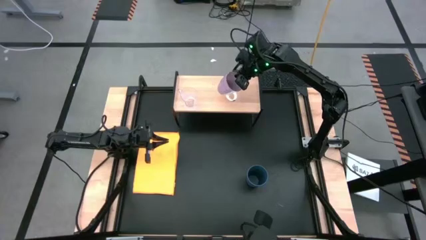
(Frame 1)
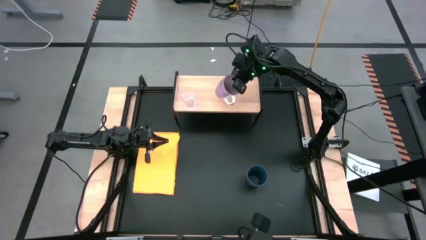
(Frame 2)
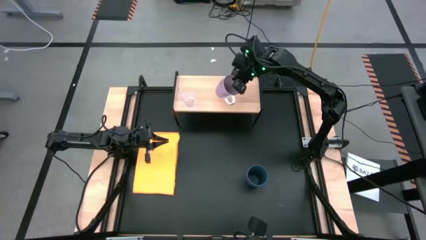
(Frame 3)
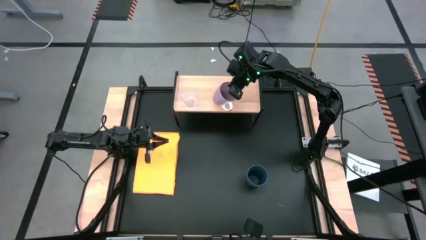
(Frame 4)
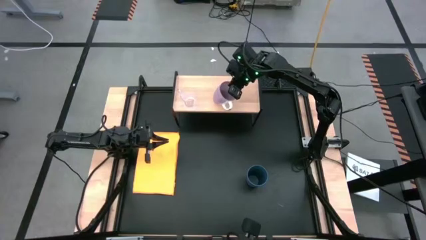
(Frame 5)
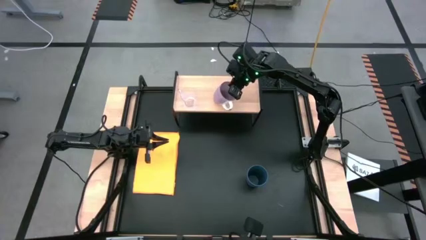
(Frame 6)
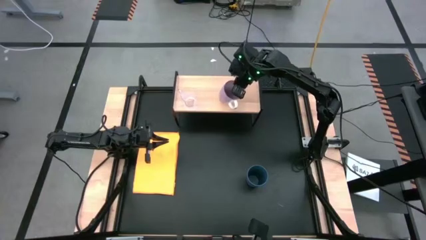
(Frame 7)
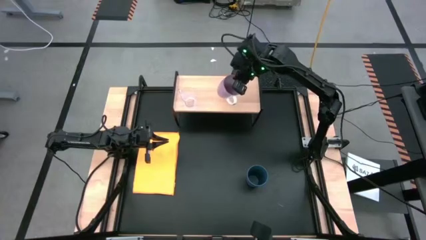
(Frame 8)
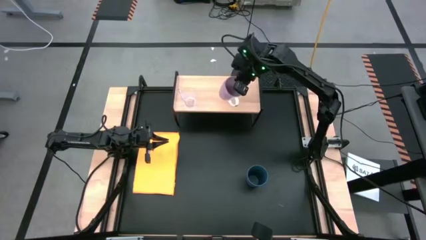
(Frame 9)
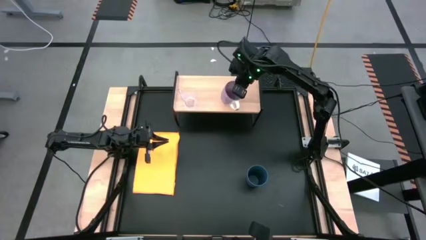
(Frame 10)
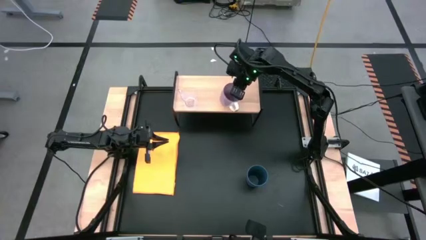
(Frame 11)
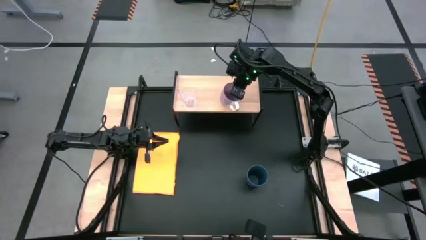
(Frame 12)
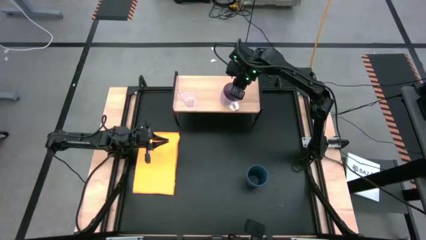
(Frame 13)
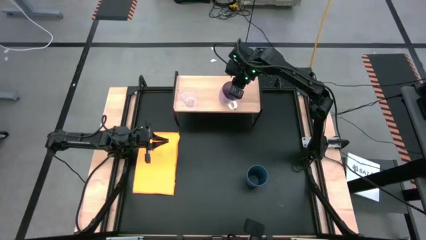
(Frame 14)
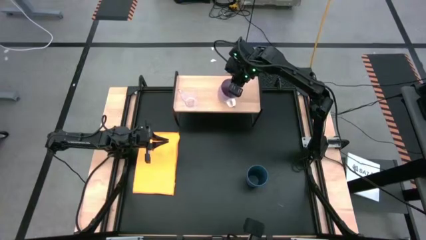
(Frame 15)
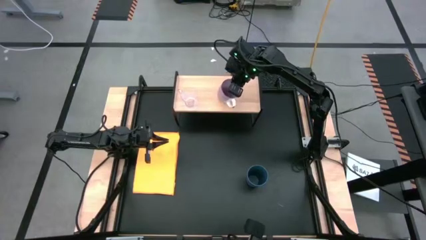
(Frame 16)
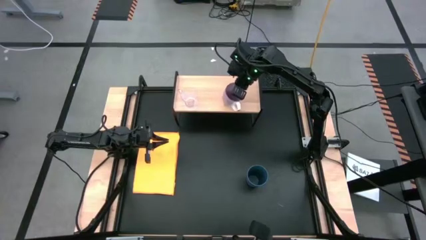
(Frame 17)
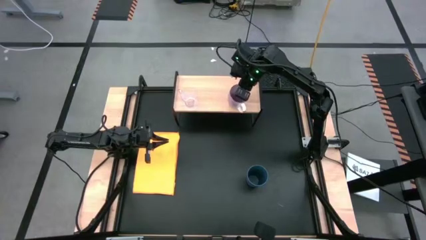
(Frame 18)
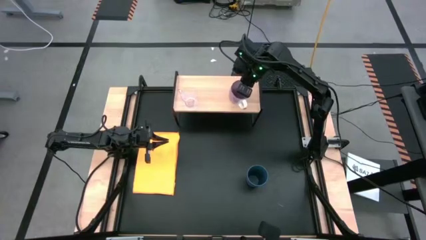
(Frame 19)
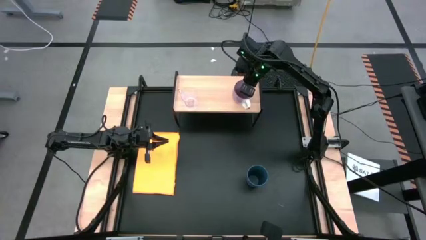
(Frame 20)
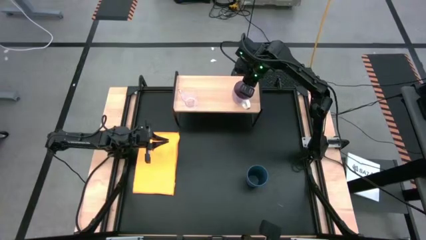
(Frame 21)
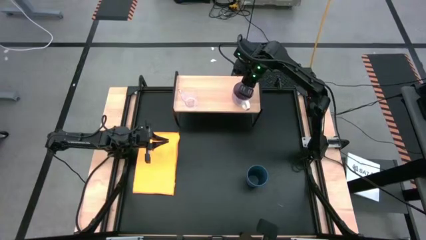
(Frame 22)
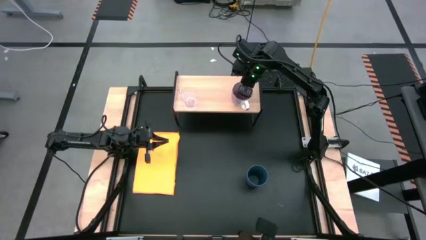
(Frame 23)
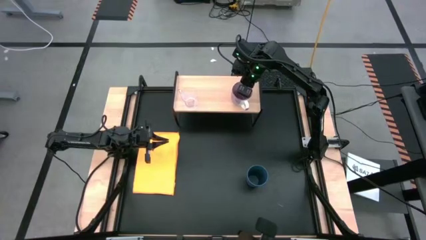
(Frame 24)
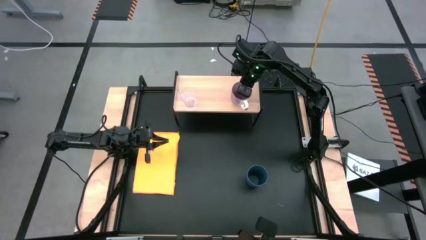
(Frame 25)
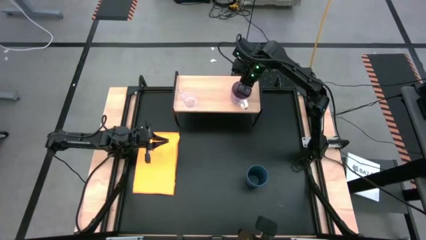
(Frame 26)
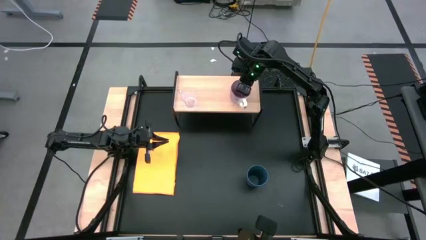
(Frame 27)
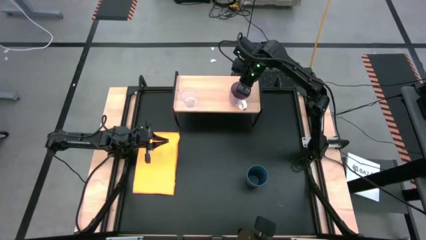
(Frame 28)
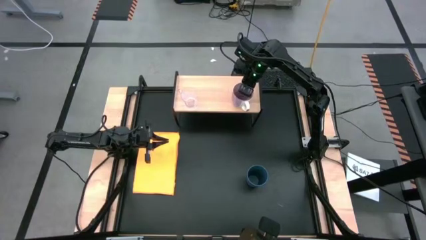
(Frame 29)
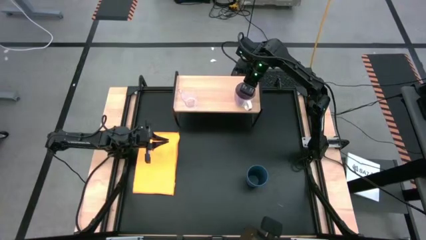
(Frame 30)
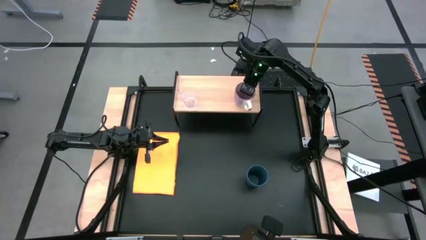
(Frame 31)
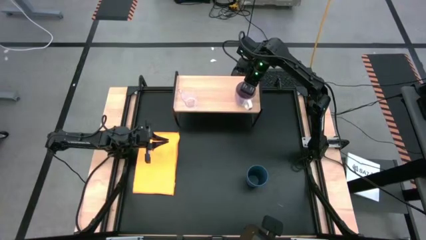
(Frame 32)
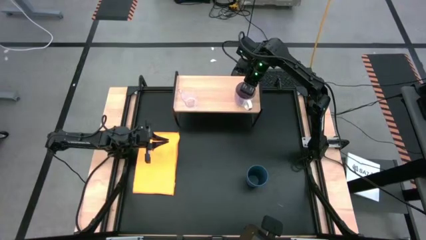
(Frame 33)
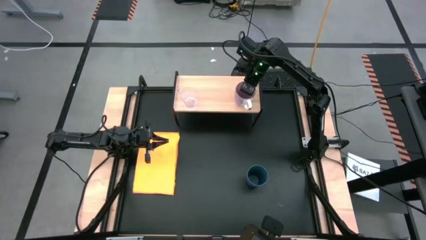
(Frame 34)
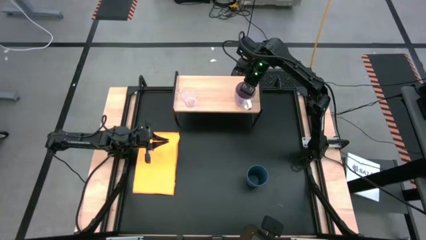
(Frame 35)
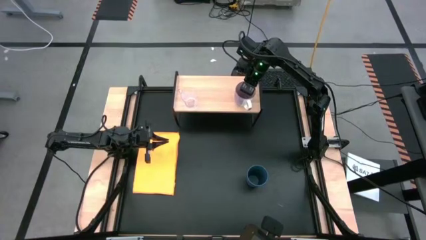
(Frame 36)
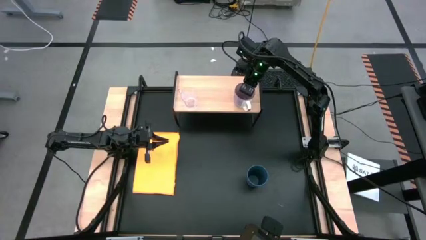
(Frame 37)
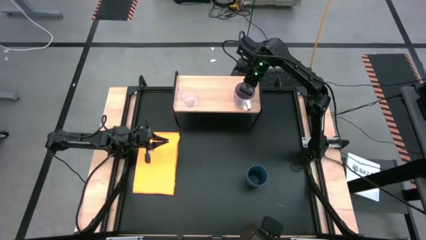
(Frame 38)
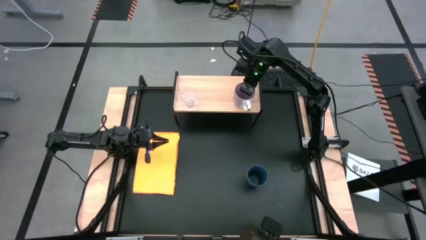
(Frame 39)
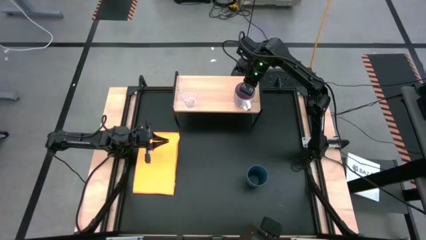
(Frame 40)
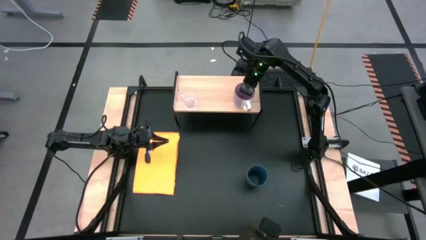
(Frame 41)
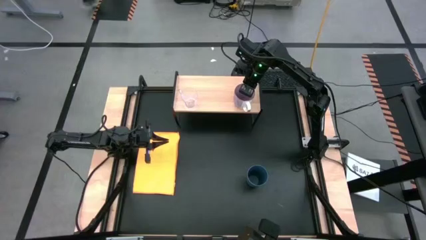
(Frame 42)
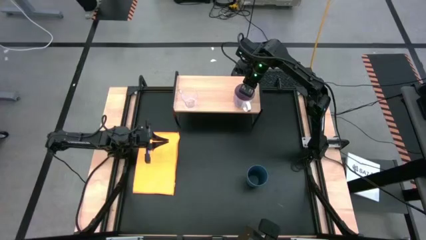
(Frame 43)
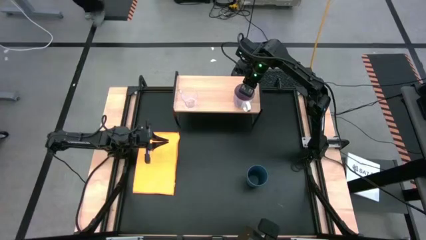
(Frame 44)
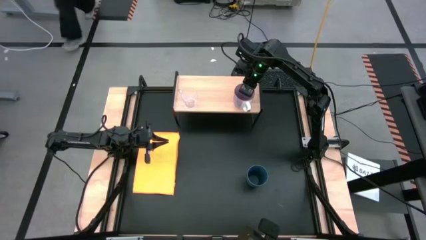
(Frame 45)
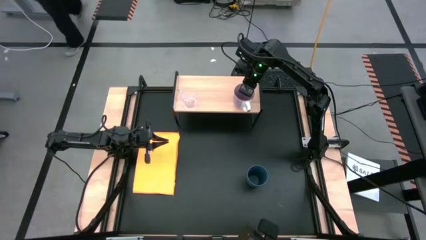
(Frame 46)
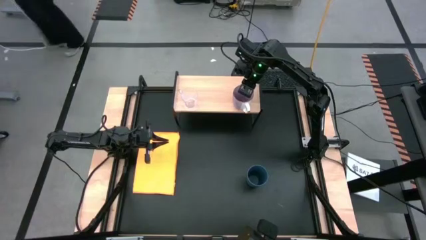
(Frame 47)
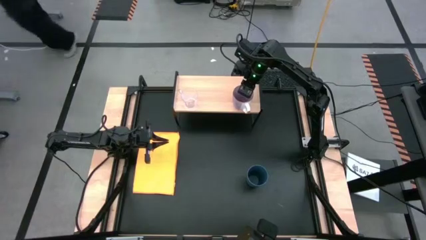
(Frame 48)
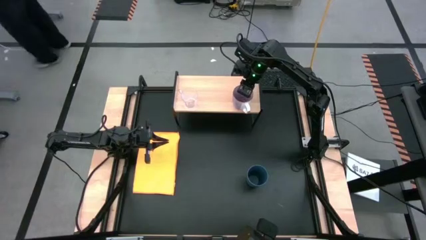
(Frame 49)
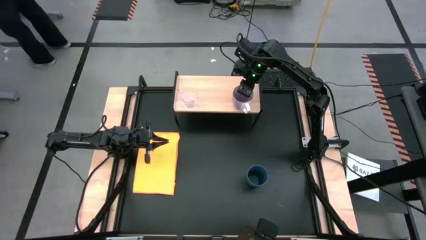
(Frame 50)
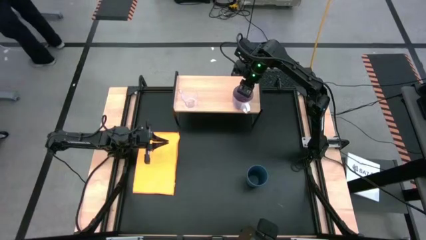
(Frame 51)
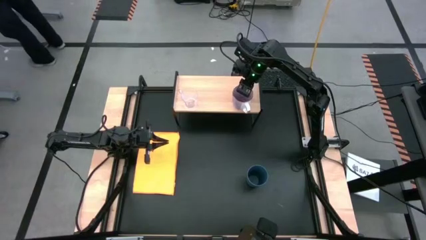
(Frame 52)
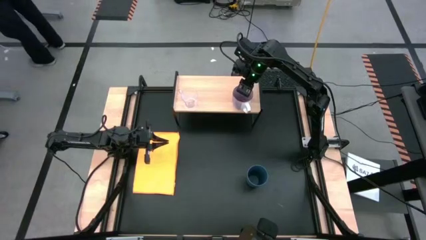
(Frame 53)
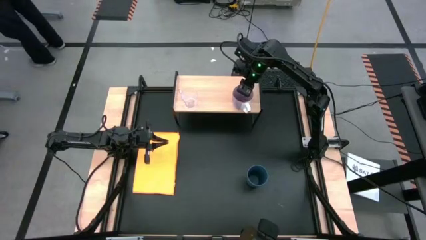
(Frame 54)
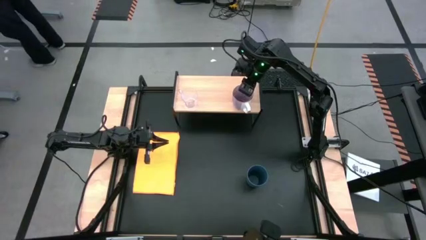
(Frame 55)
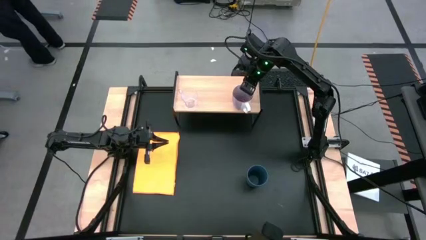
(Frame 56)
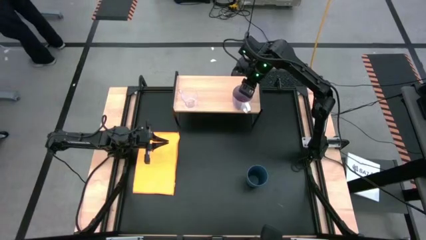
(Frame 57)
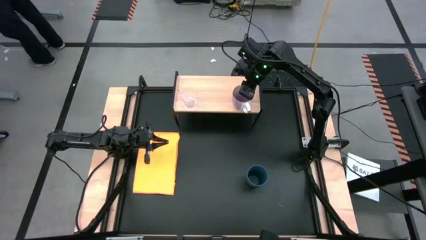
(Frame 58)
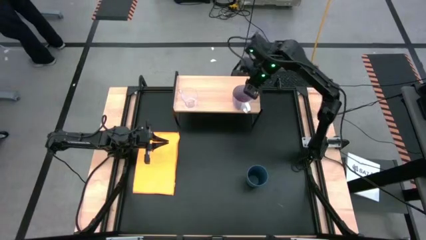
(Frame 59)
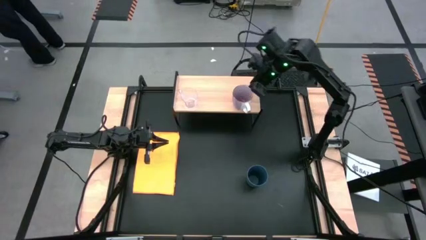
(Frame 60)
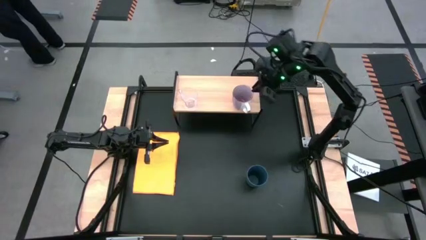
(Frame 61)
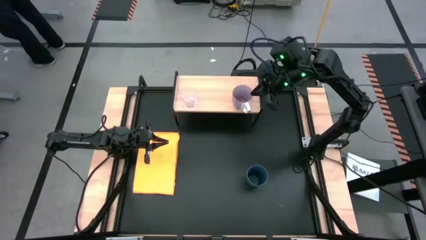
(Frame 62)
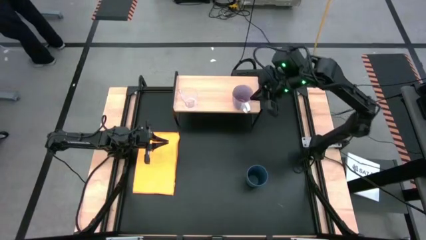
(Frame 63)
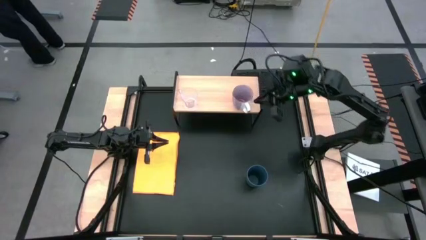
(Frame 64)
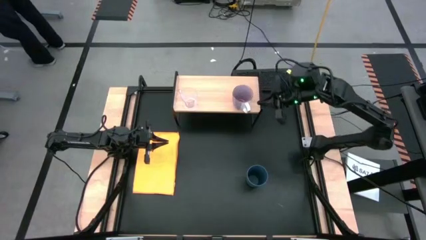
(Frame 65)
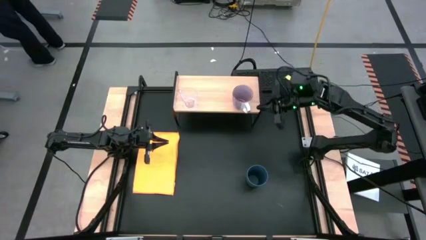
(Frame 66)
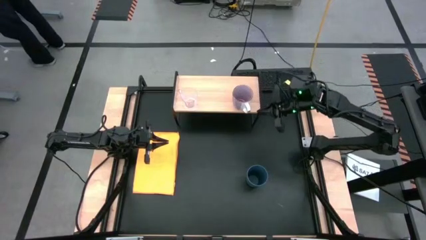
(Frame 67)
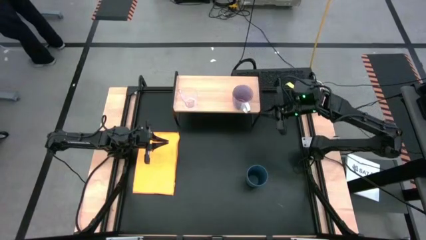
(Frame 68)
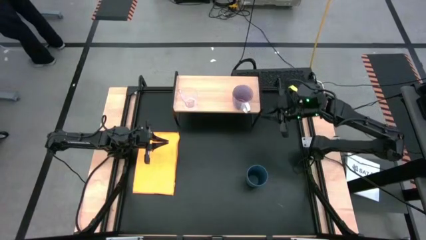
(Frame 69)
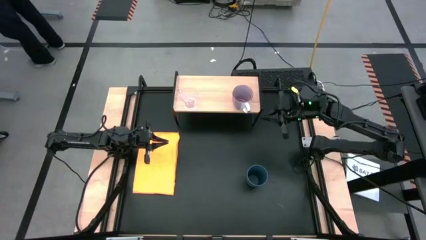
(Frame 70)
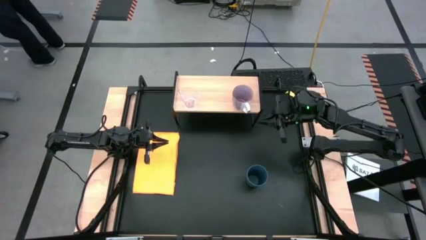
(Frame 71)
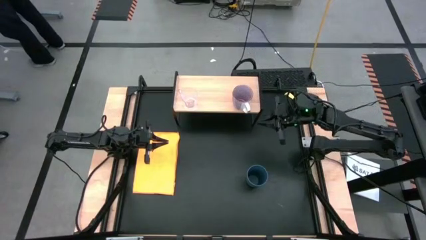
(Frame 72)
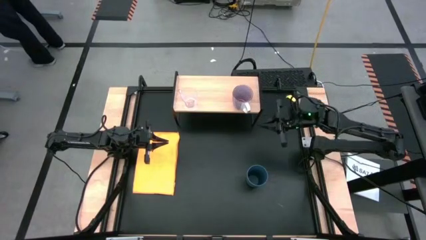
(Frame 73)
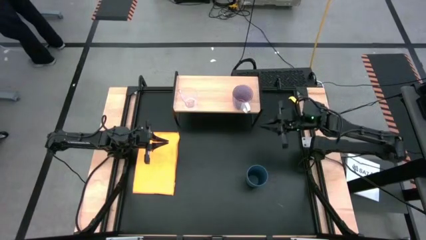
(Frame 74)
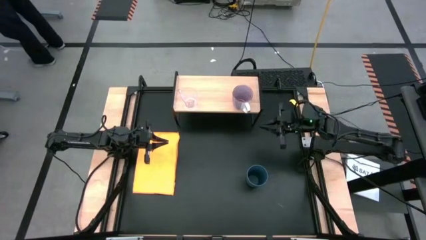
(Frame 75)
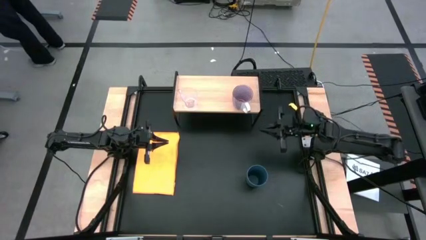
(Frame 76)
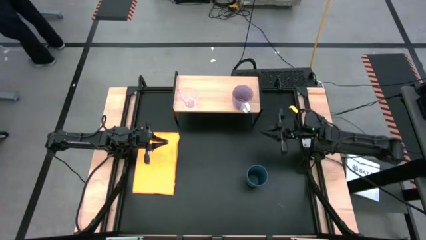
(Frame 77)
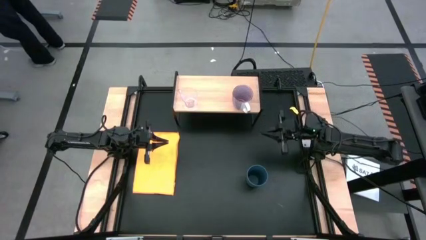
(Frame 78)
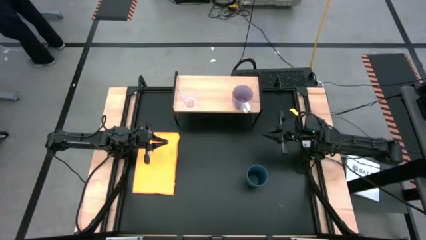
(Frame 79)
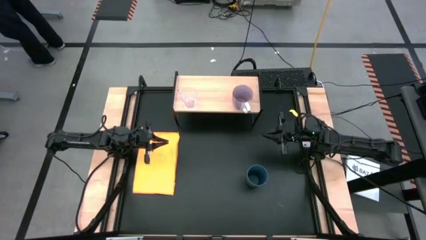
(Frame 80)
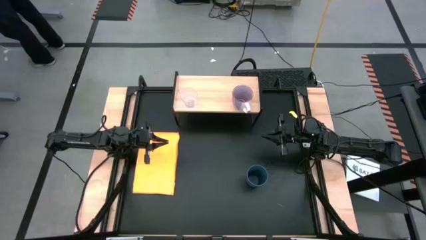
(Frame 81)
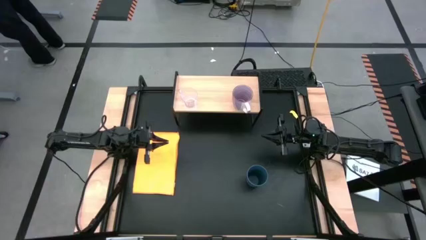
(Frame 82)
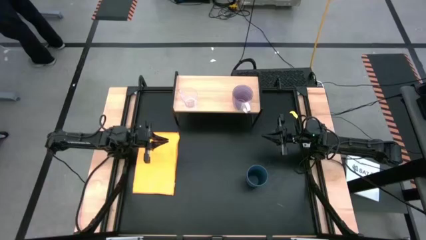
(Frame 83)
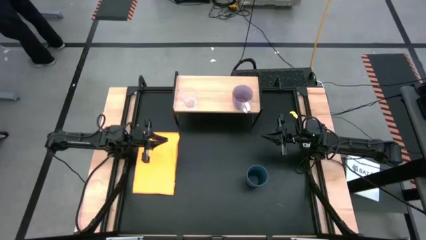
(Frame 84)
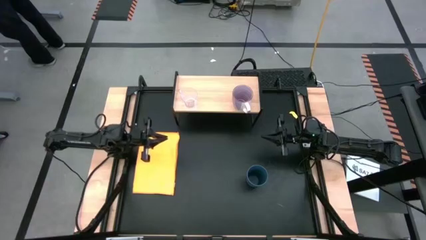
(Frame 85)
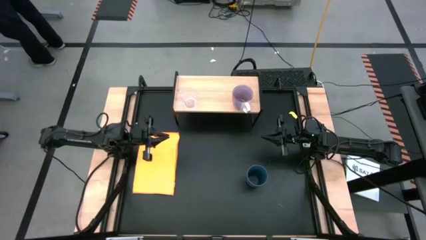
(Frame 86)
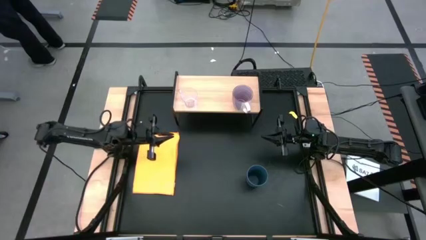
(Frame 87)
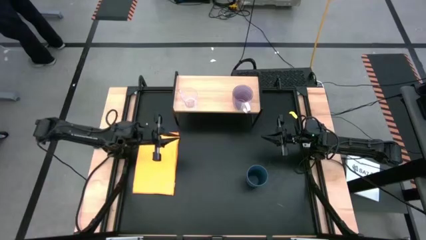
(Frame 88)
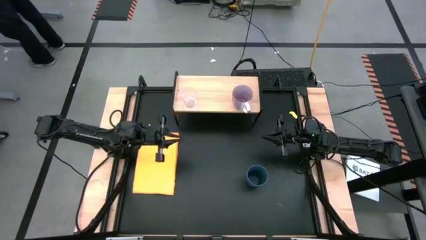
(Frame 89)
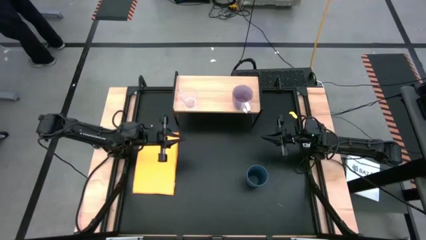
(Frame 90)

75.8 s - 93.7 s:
Task: Stack small to large cups/mugs on shelf
Put the purple mug on the shelf
